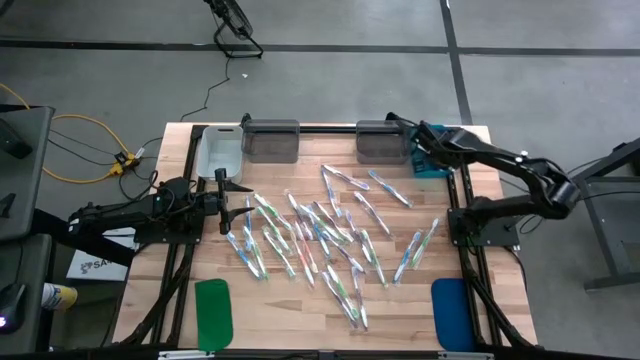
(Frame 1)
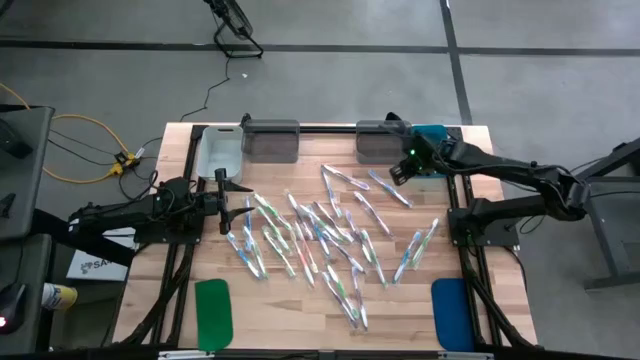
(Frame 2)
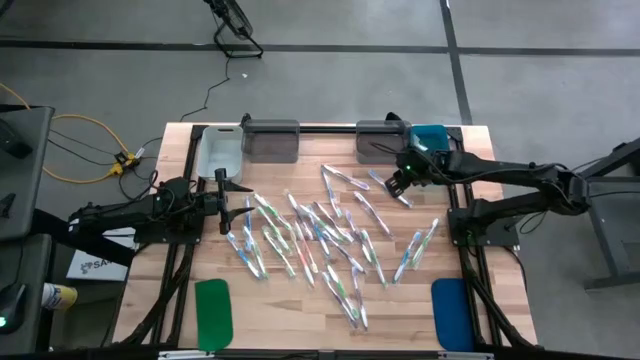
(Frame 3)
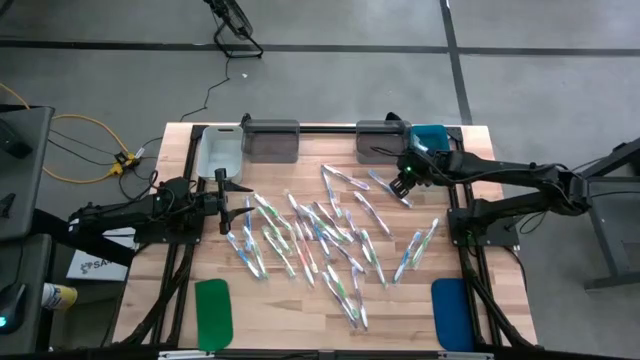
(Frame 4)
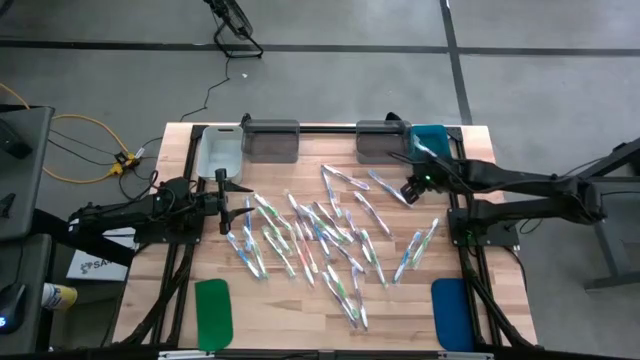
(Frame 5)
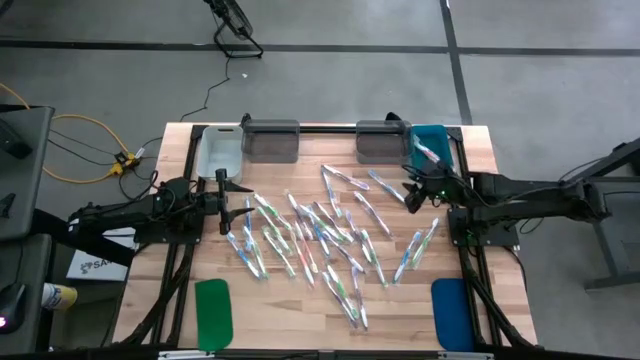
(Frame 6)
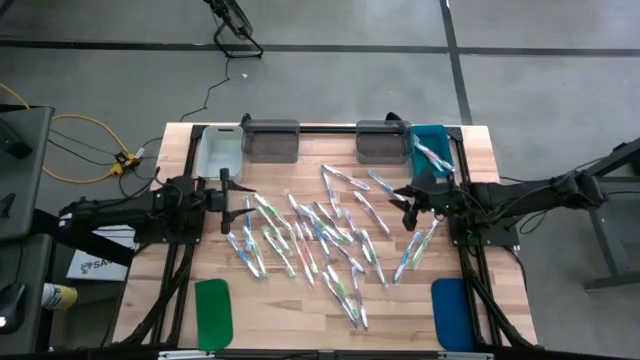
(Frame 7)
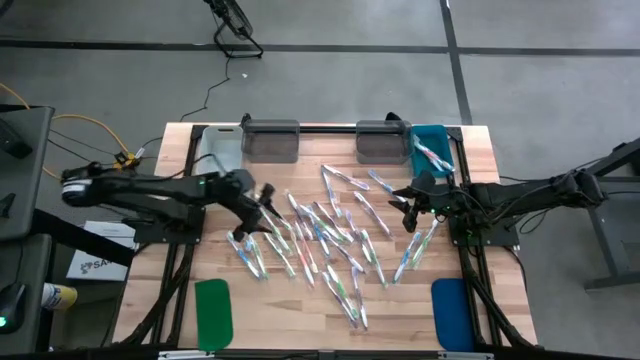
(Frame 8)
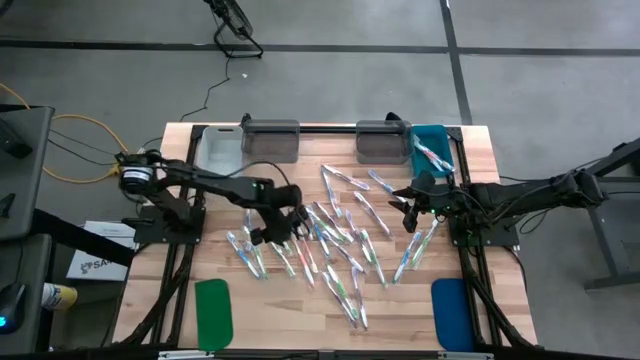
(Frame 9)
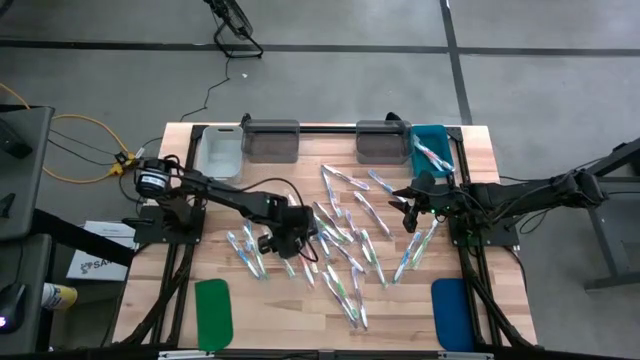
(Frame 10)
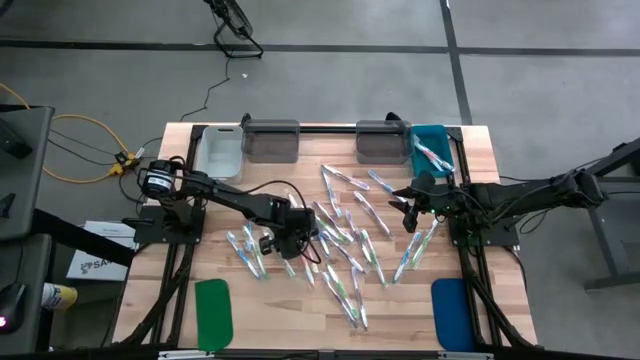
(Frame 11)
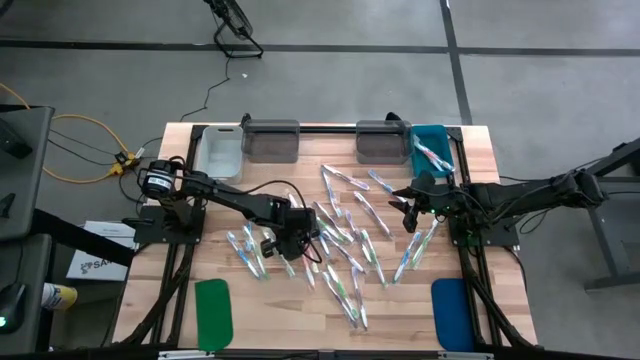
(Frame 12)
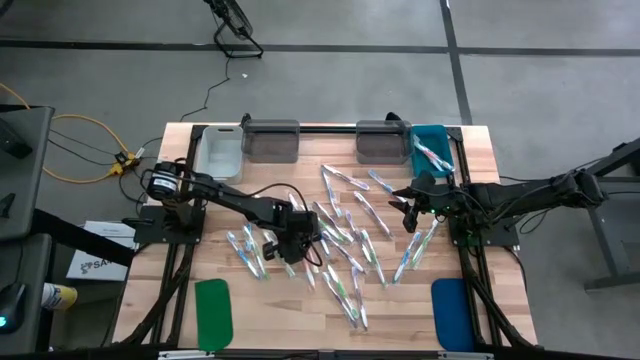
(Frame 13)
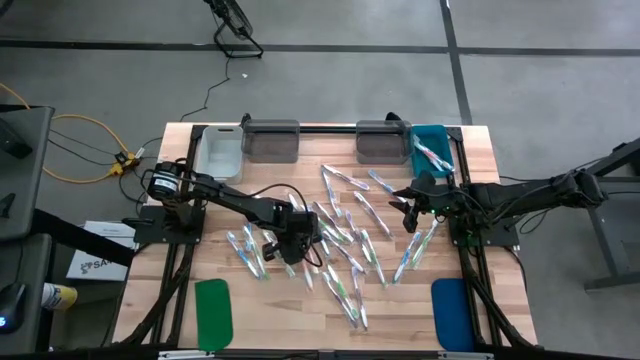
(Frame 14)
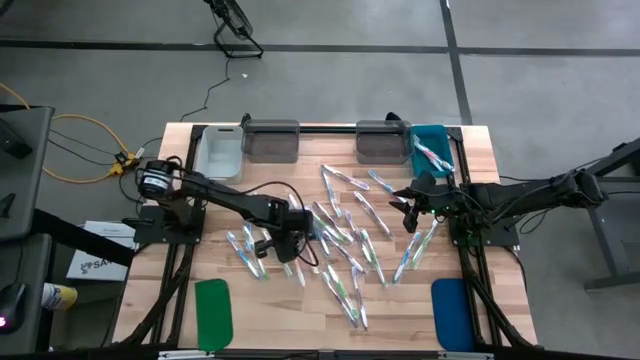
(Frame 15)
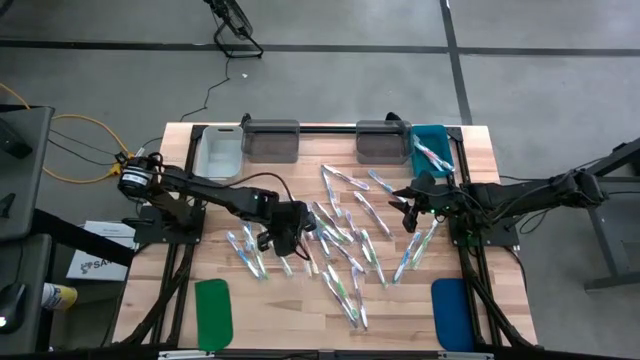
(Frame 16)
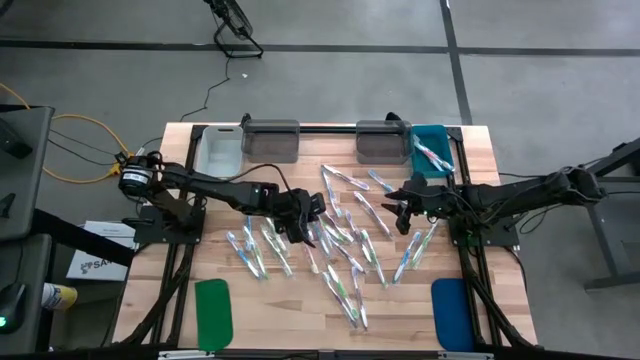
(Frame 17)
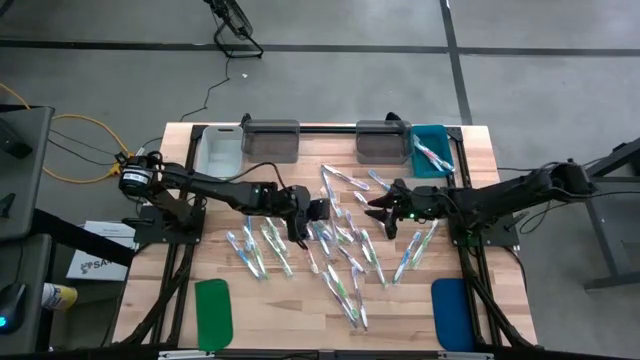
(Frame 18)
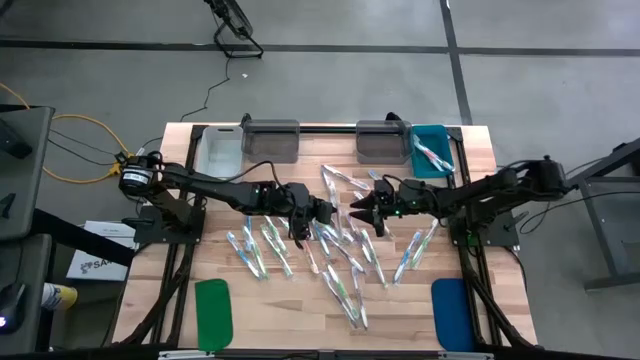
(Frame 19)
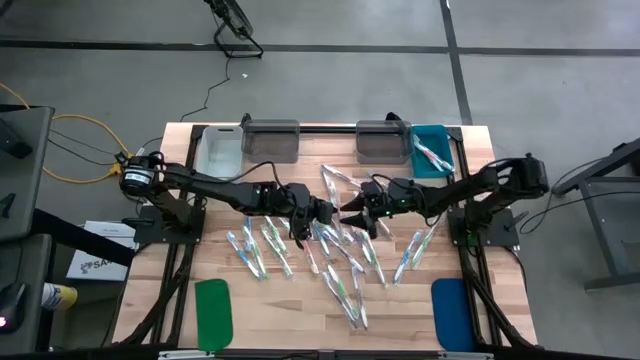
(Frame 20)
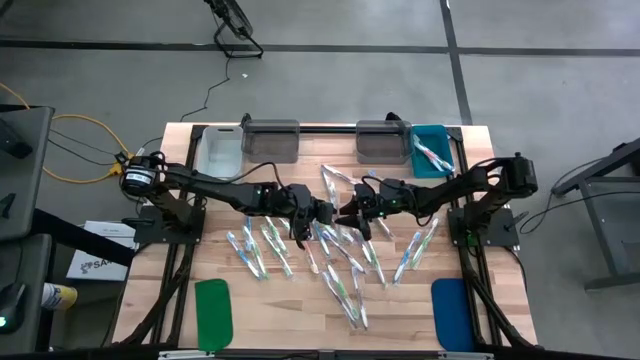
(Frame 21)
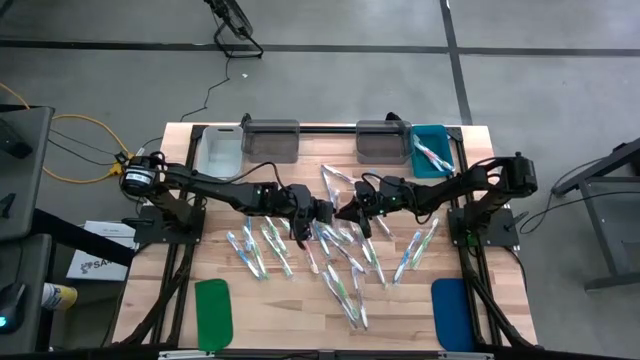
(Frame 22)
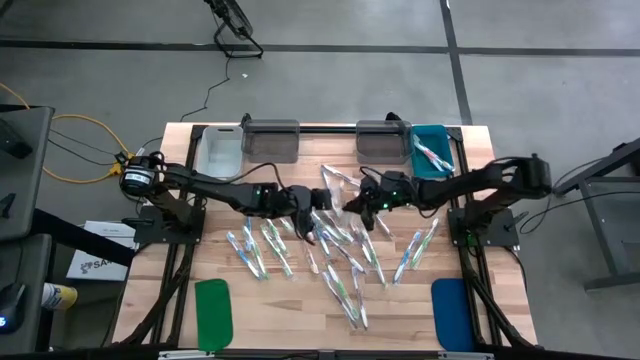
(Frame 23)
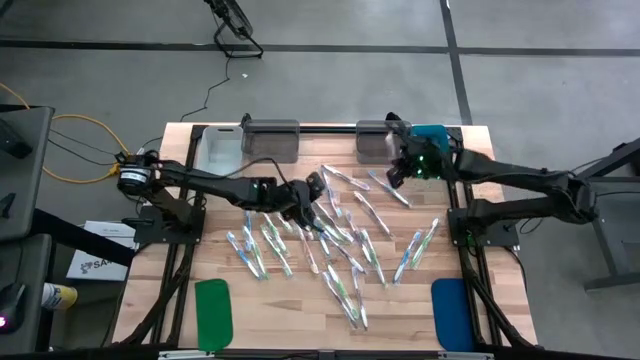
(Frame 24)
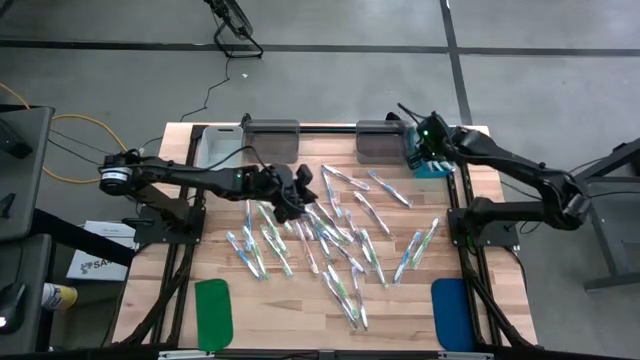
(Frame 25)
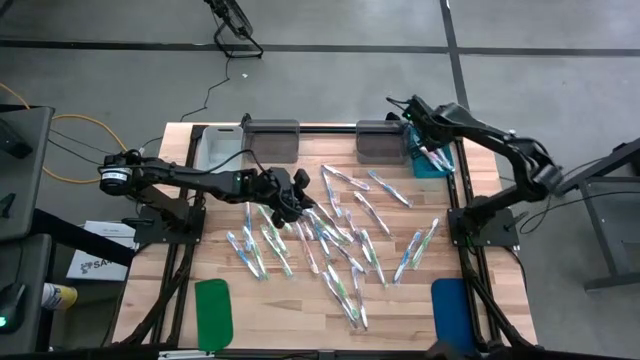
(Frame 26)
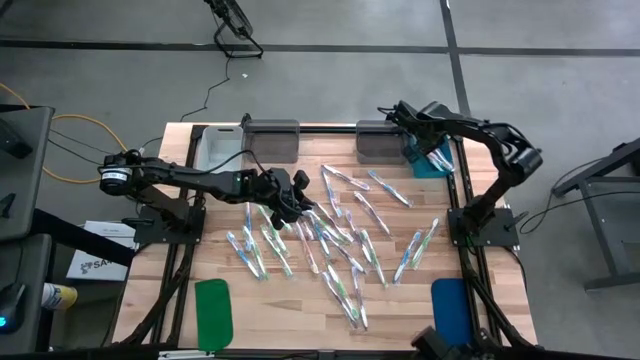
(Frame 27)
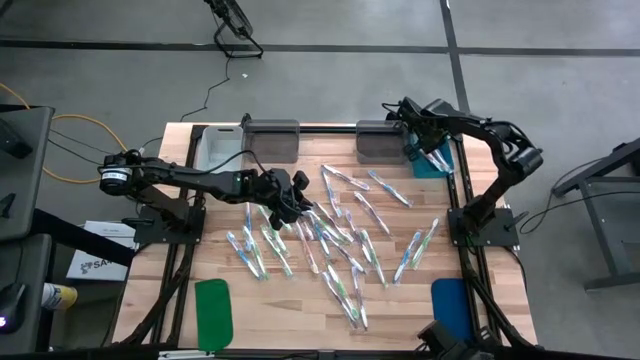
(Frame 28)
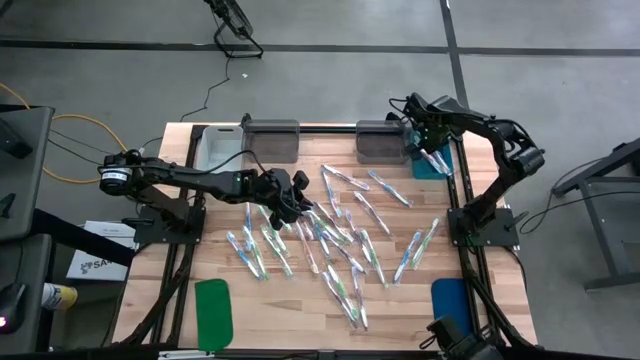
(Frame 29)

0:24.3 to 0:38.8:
Task: Pick & Place Toothbrushes
Put the orange toothbrush into the blue bin

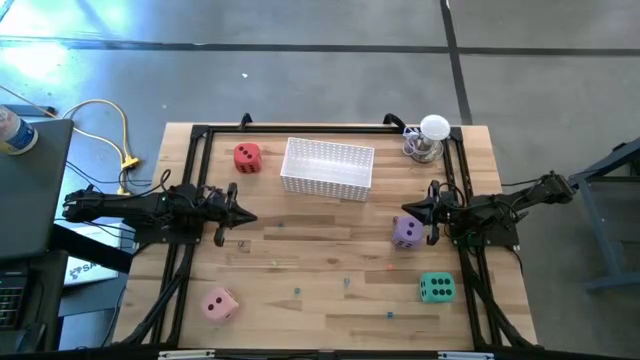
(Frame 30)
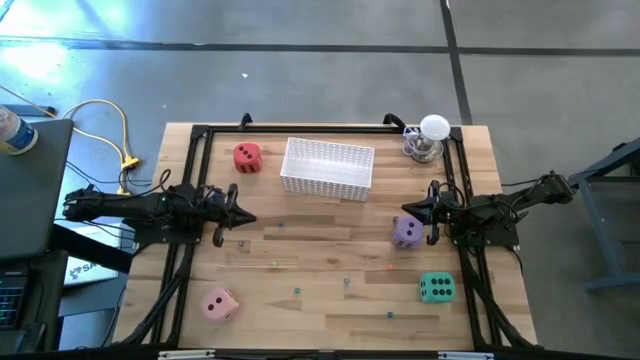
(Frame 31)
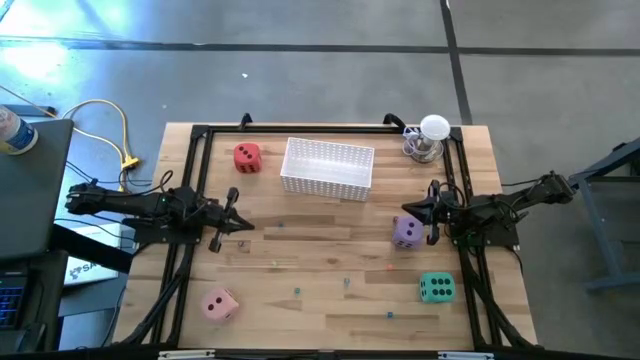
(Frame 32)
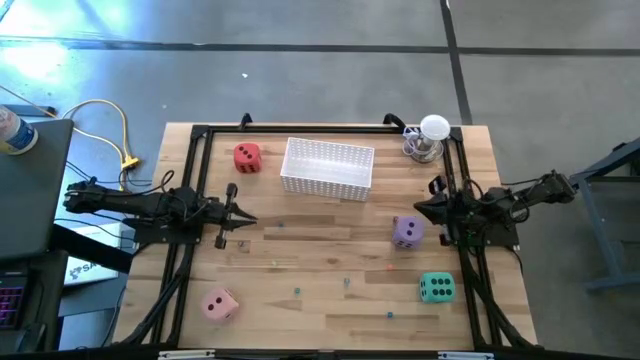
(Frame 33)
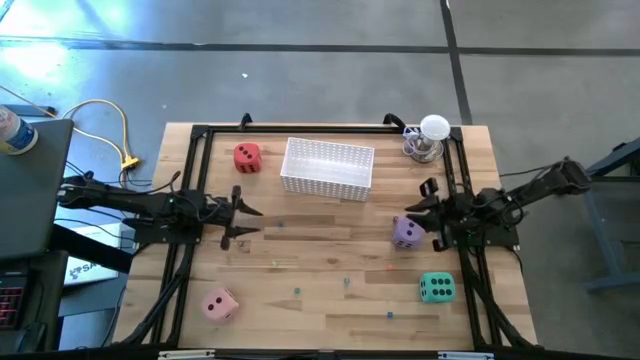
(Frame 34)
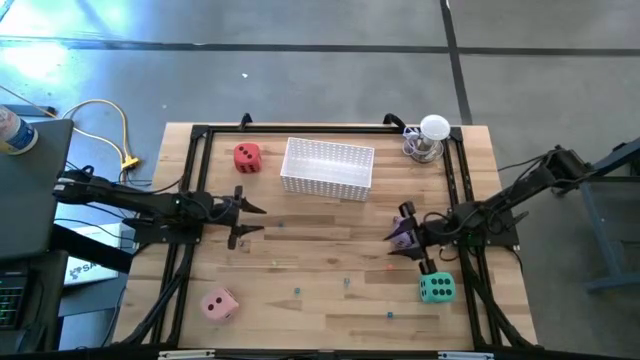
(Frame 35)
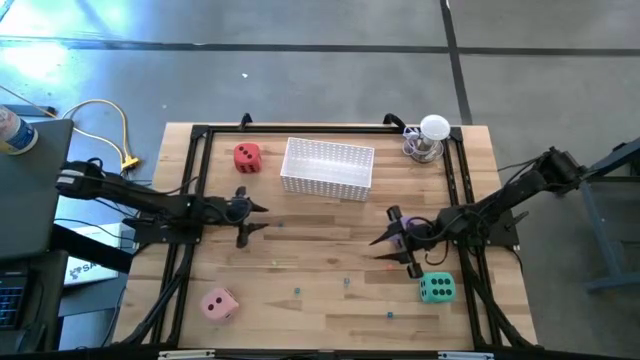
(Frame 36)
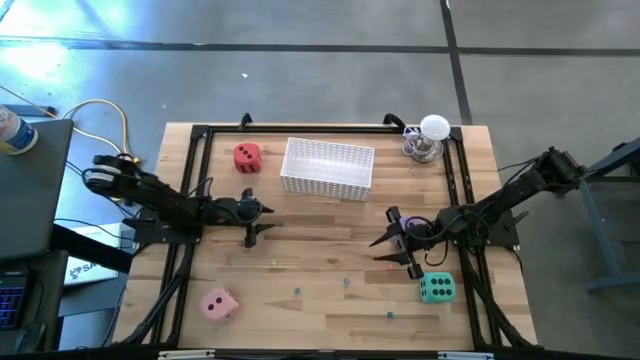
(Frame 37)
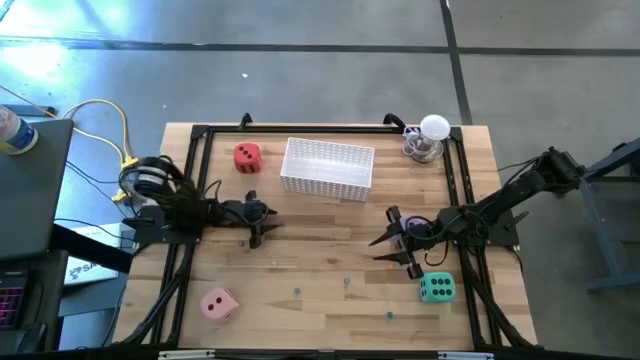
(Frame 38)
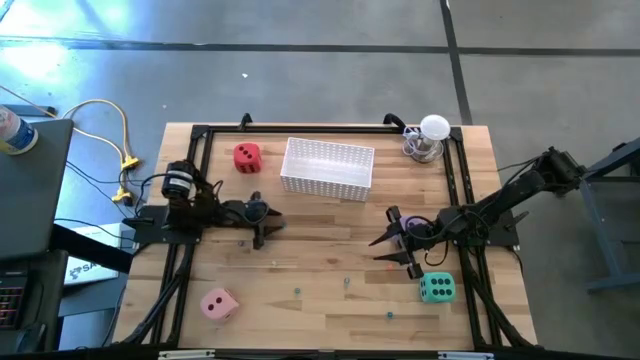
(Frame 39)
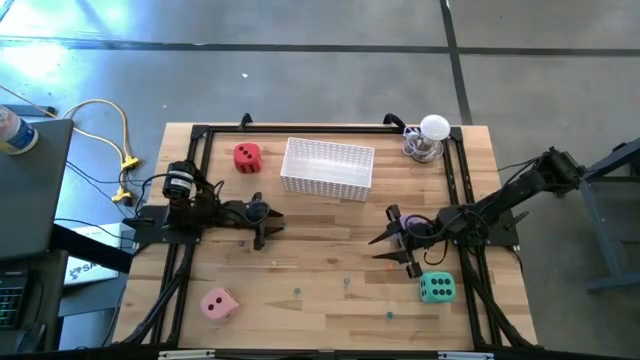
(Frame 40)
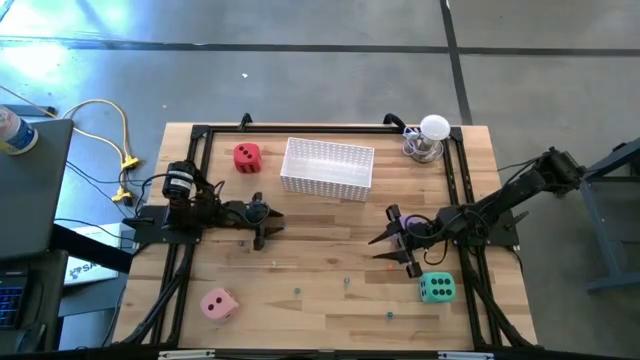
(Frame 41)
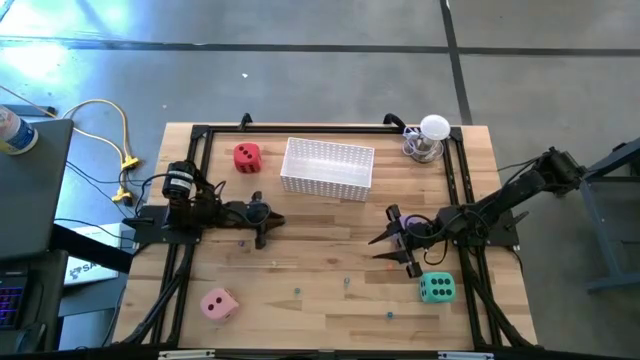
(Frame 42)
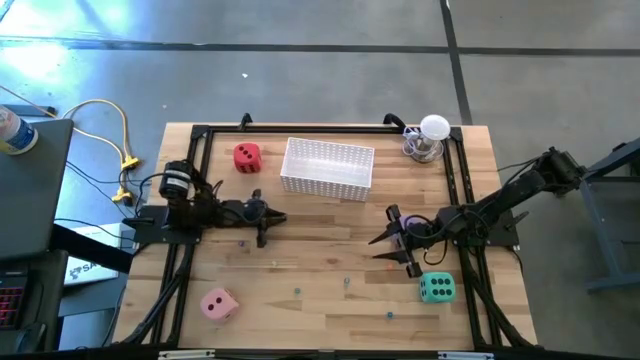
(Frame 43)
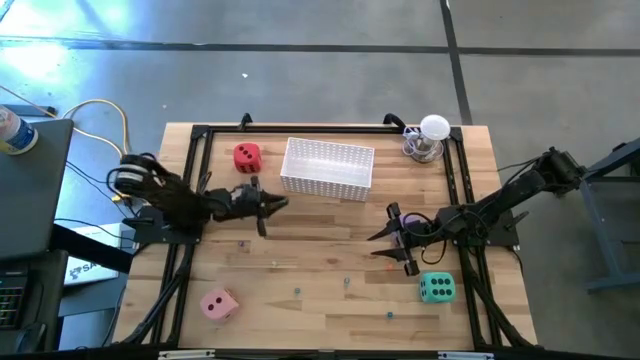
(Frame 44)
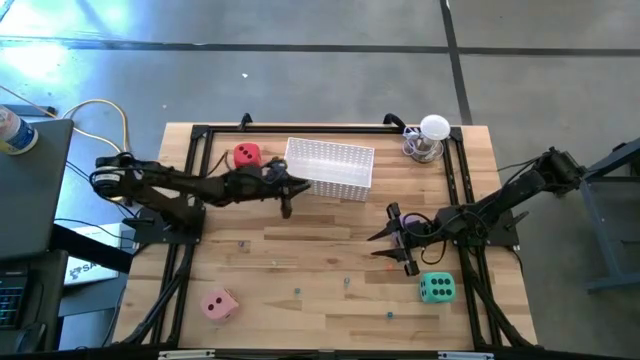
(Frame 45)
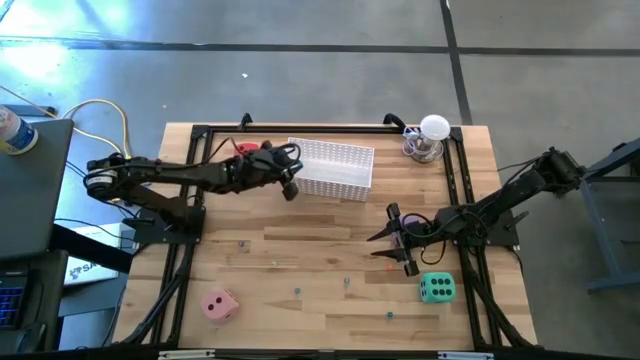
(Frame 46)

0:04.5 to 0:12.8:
Task: Pick & Place Dice
Put the small light blue die into the white bin
